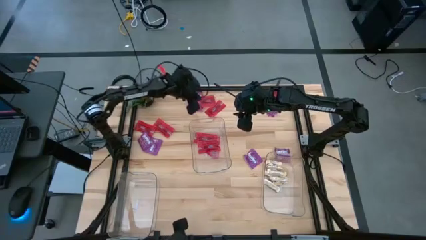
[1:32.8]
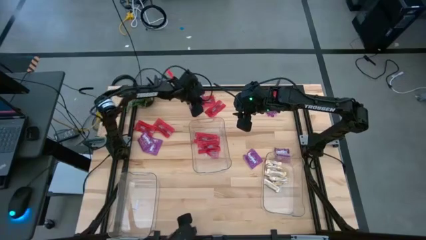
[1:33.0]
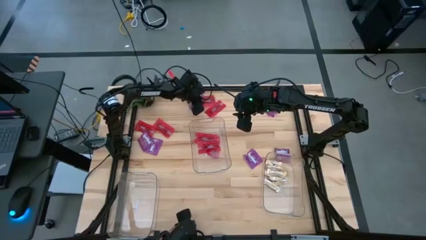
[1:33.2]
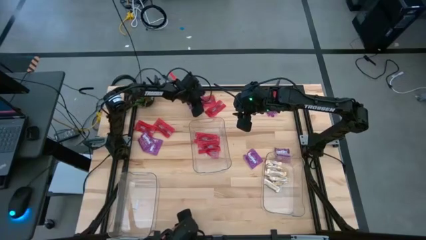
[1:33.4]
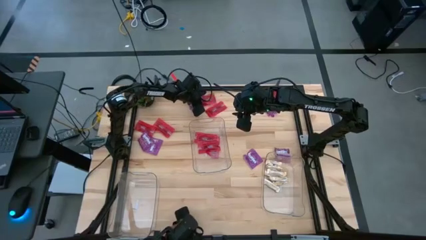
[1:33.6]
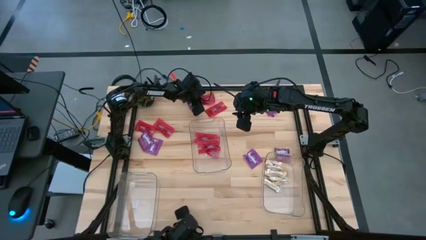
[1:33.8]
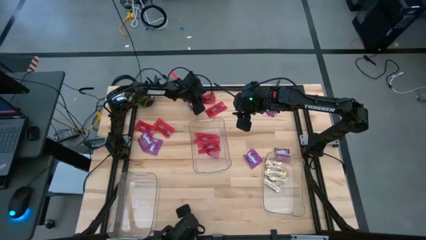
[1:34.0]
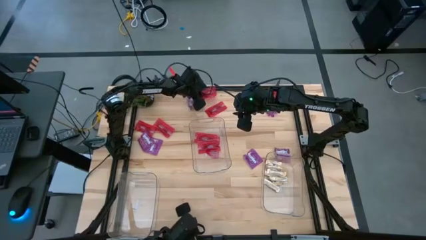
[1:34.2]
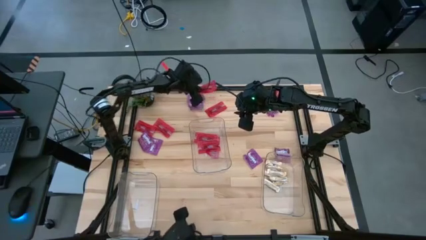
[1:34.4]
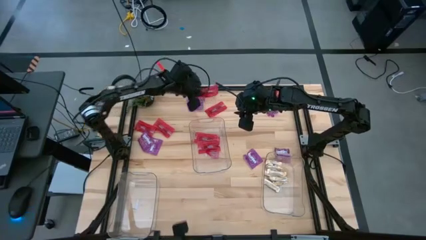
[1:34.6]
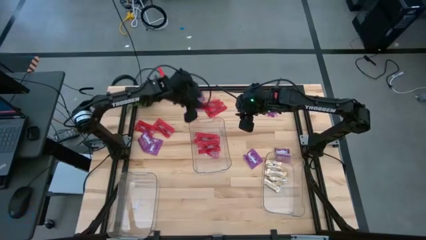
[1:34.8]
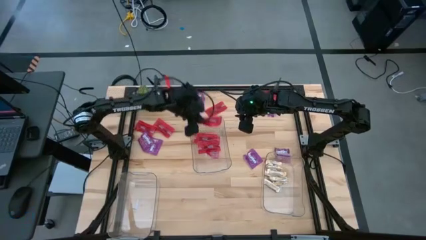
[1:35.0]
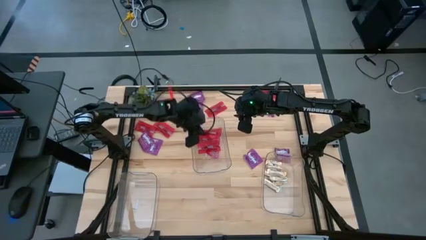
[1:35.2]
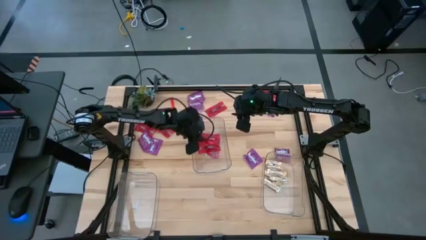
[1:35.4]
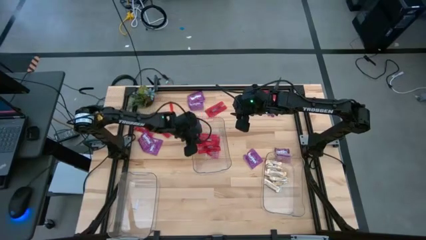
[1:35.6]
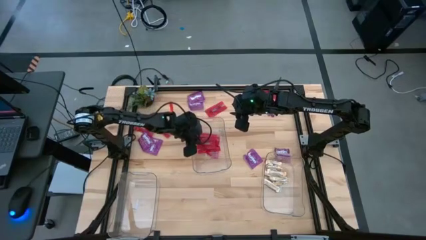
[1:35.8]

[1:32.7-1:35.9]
Task: Sort candy
Put the red candy pack into the middle transparent bin

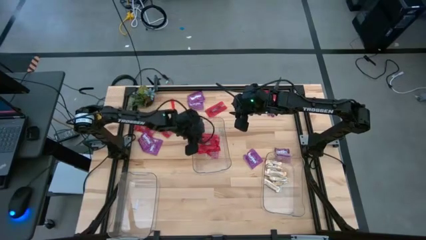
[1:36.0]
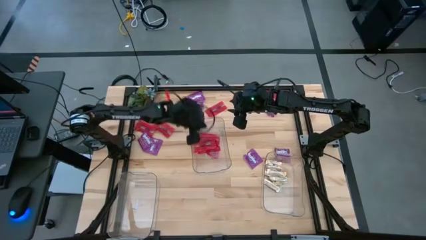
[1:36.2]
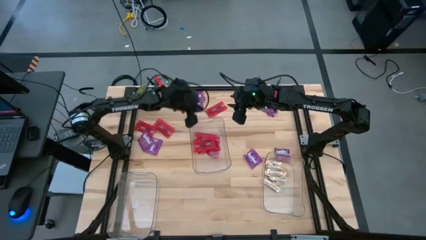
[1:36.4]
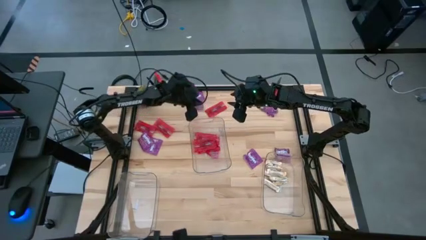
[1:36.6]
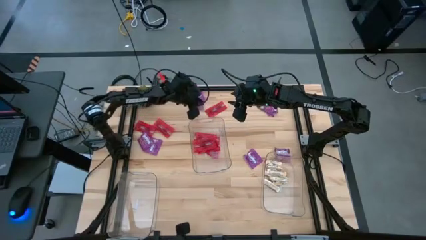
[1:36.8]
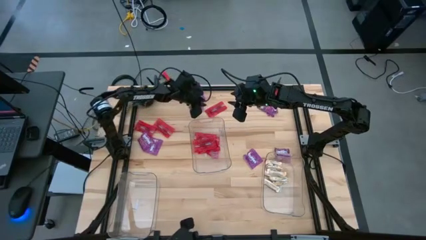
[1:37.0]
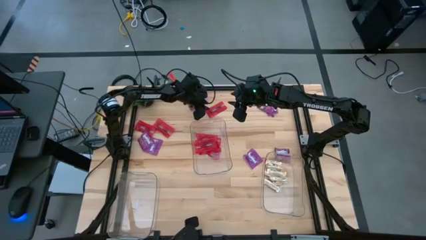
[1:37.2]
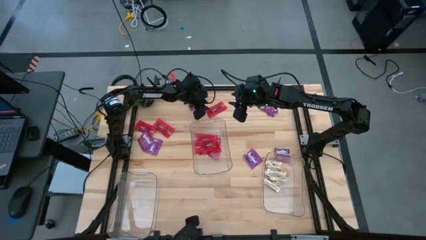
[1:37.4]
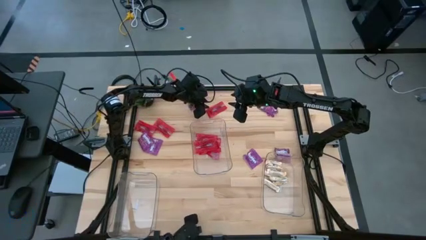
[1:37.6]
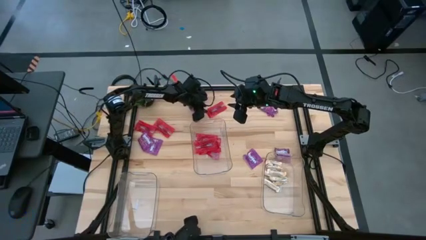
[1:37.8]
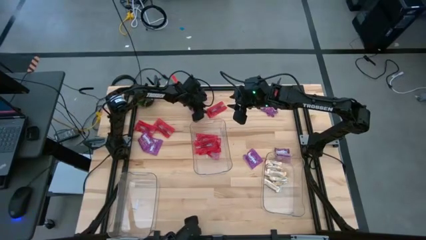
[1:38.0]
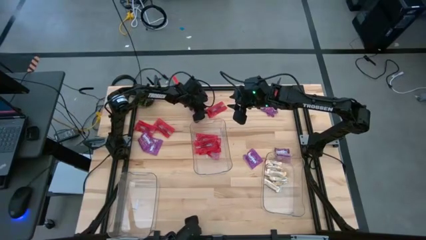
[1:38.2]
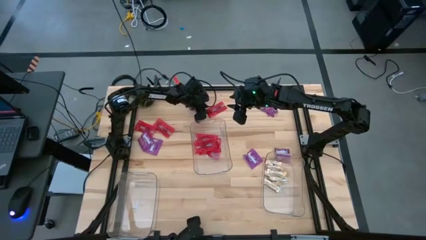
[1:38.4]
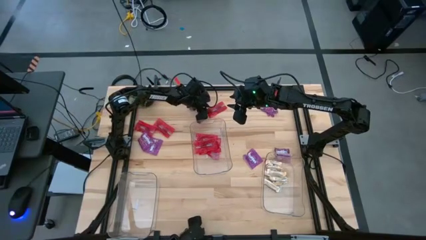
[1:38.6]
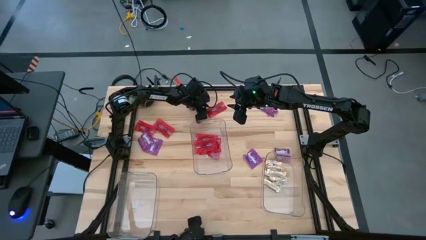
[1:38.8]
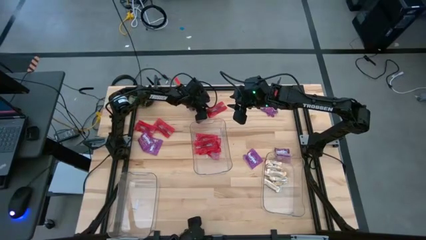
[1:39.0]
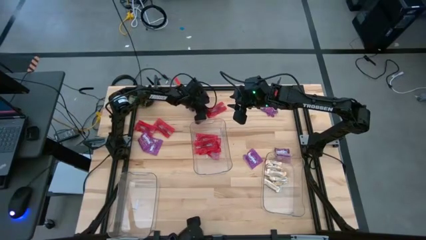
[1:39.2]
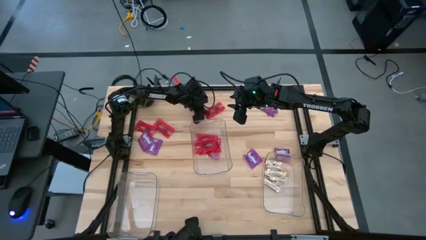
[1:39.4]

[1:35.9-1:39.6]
Put the red candy pack into the middle transparent bin

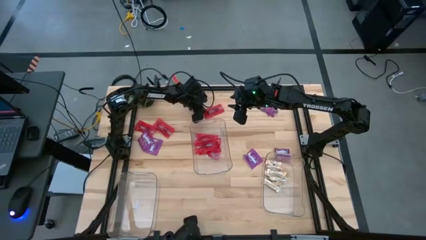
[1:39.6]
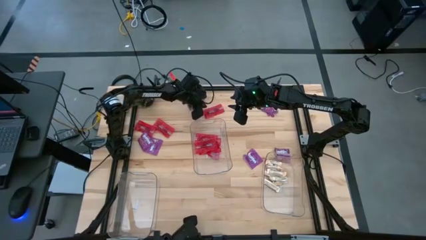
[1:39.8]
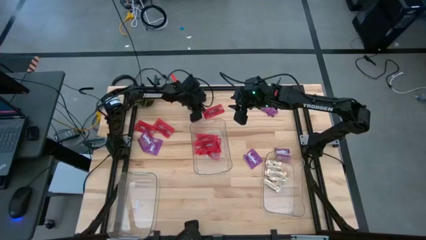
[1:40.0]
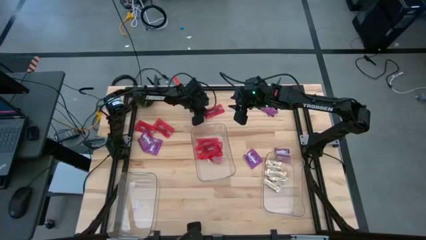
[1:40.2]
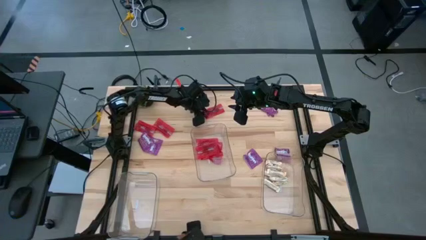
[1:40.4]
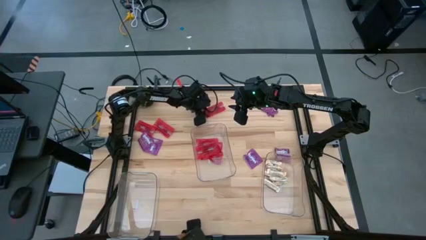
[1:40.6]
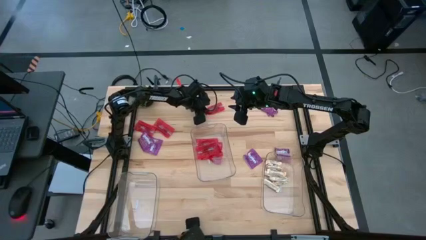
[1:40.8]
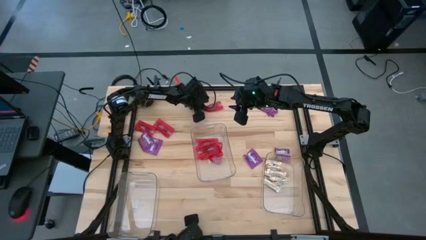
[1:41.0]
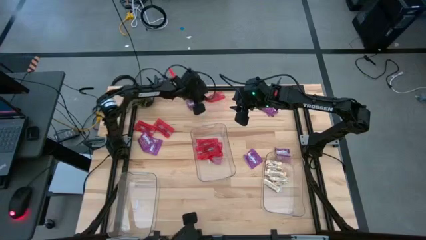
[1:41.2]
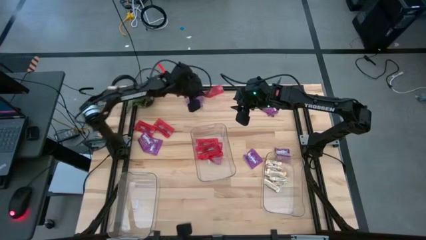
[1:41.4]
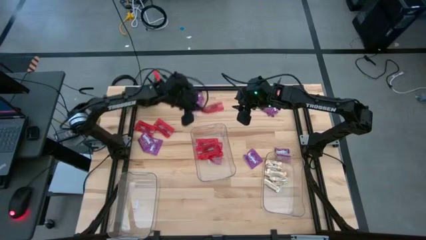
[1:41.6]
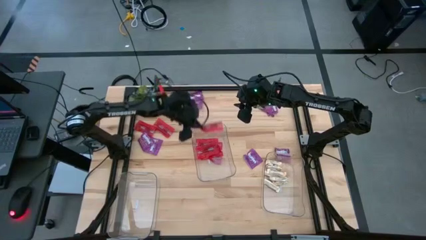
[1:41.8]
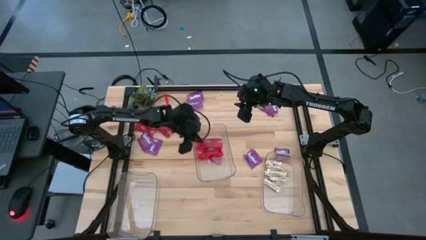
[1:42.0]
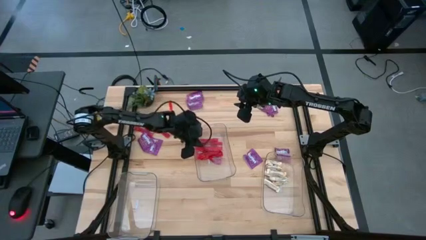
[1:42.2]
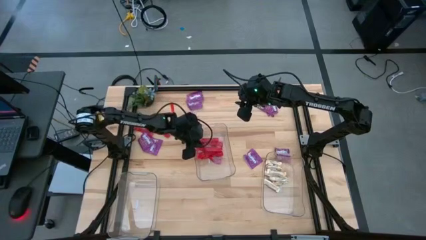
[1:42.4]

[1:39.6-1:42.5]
Put the red candy pack into the middle transparent bin

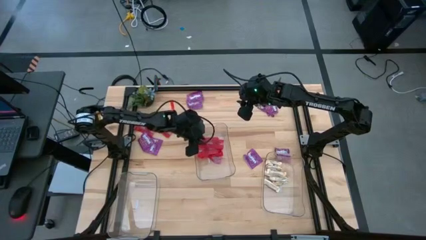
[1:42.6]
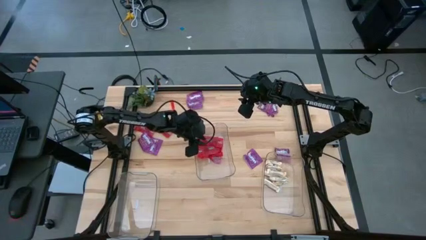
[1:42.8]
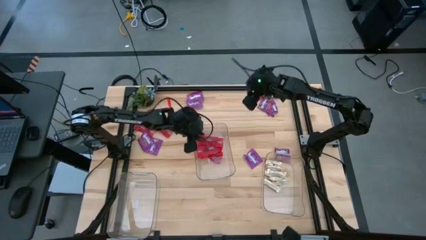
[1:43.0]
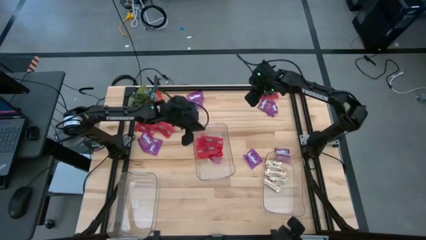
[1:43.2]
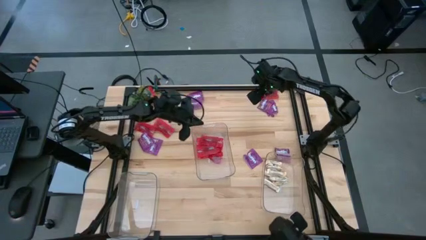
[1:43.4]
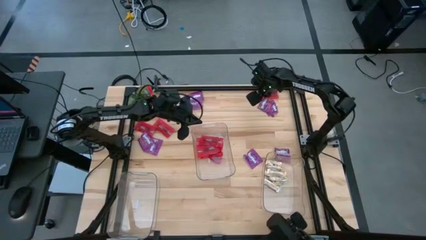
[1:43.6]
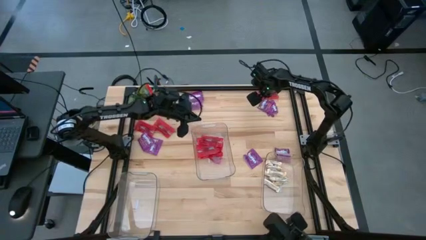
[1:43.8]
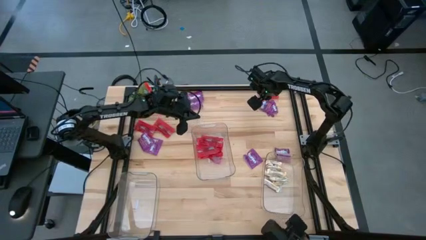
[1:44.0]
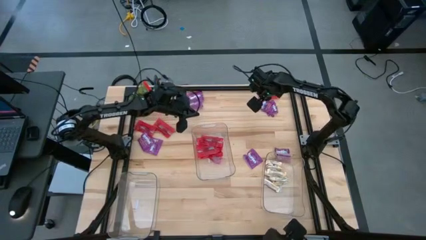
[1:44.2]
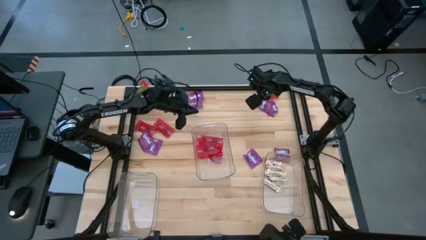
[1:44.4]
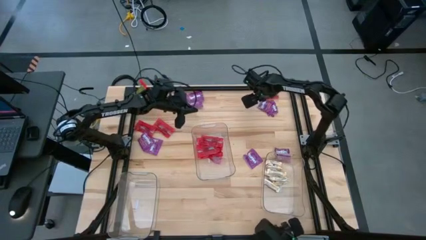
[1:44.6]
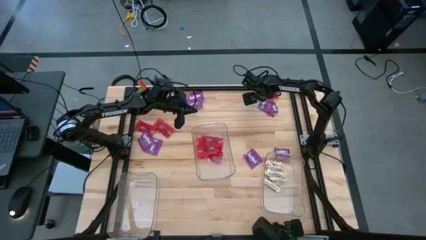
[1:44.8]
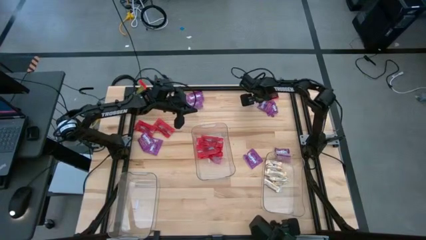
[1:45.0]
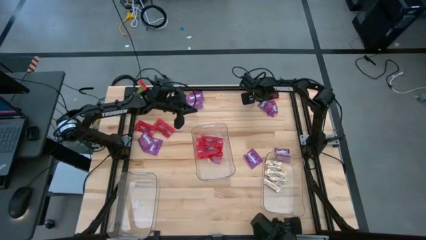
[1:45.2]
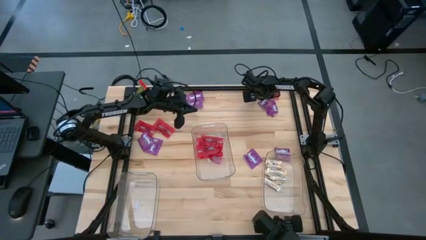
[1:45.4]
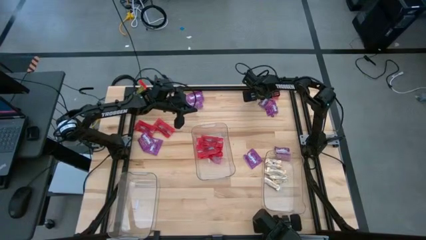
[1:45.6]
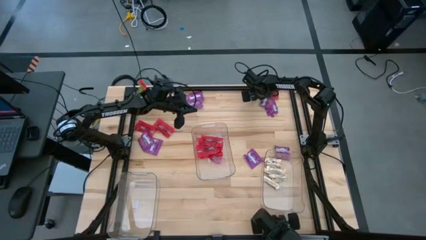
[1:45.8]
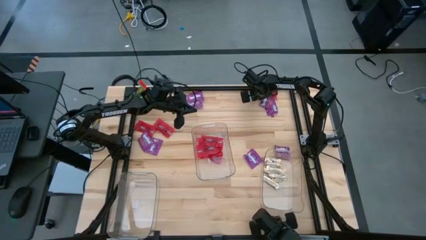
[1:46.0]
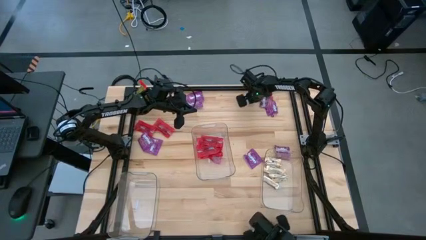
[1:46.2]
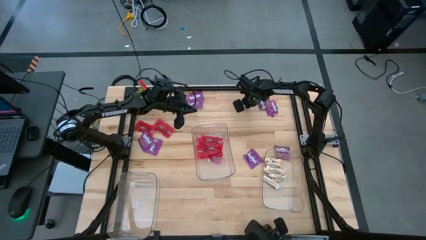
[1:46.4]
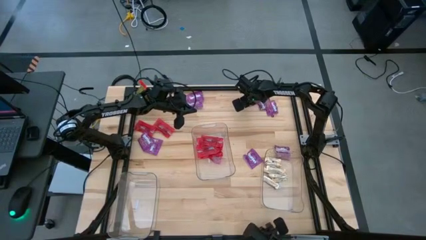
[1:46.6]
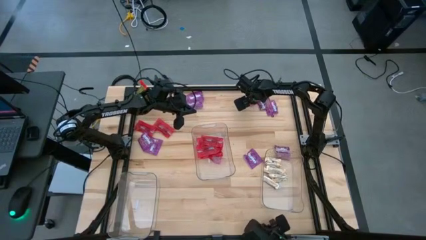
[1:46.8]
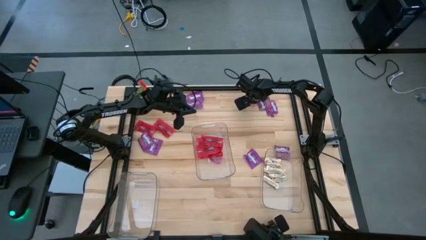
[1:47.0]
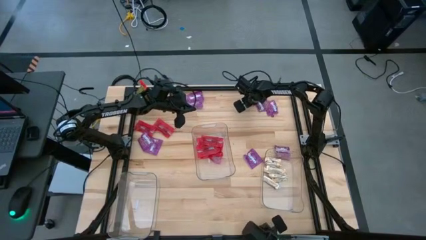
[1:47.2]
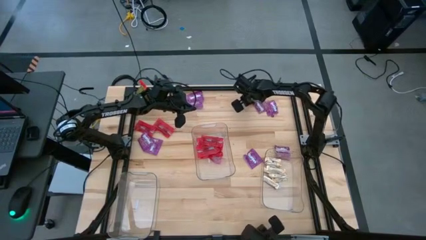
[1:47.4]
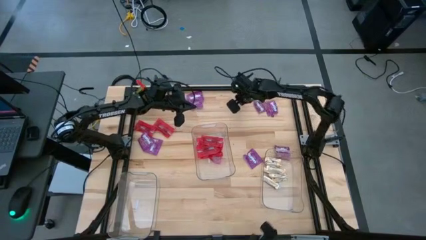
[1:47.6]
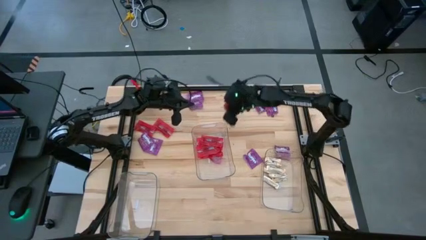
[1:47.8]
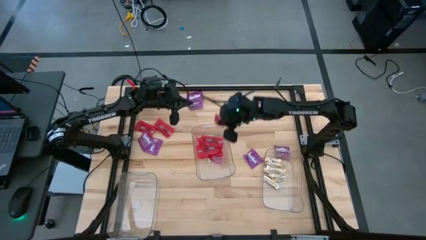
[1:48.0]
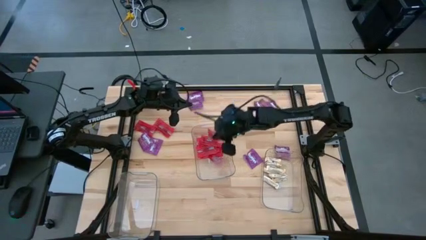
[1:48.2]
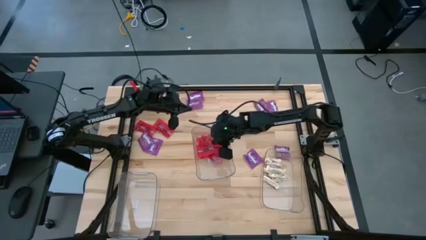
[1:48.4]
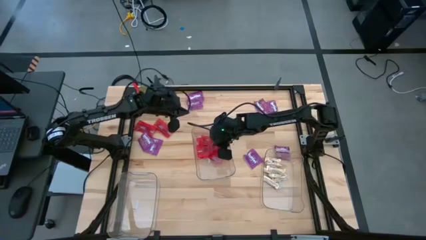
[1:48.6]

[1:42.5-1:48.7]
Put the right red candy pack into the middle transparent bin

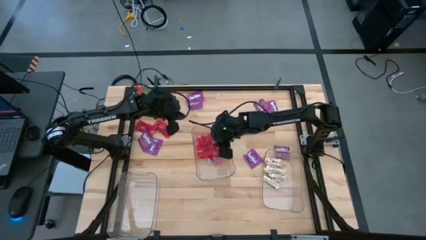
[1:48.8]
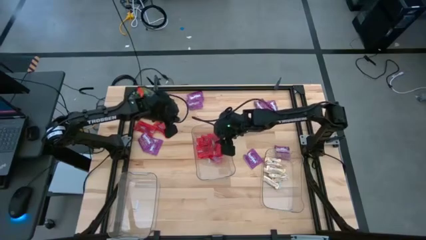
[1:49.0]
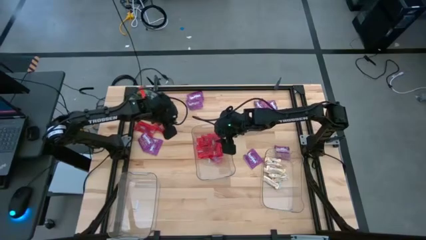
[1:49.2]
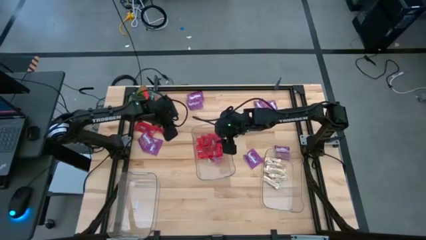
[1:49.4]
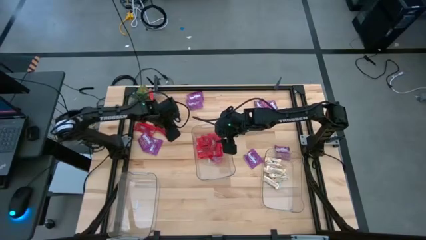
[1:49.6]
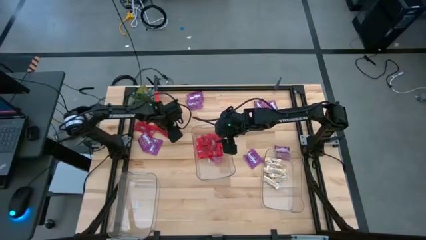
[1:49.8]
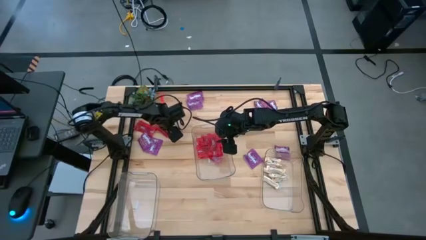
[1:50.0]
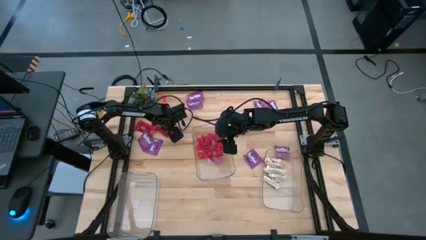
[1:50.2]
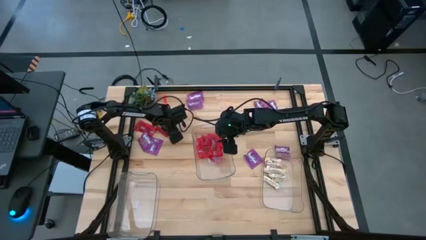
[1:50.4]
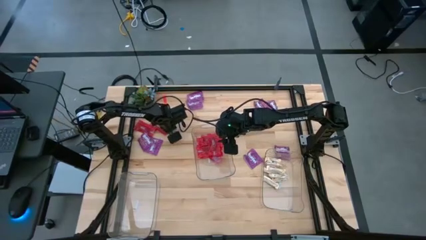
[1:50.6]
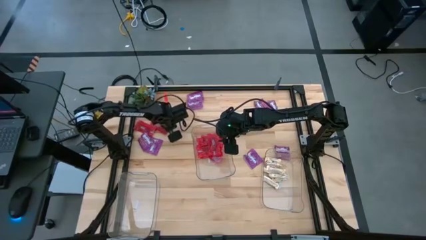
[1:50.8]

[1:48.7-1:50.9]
Put the red candy pack into the middle transparent bin
